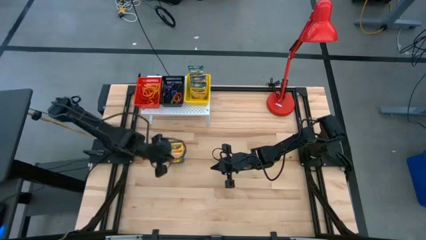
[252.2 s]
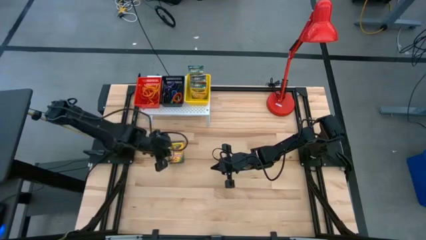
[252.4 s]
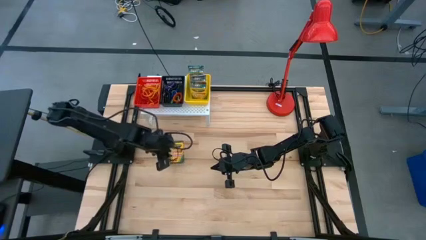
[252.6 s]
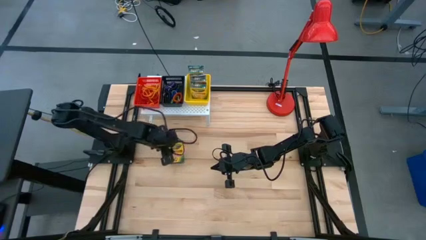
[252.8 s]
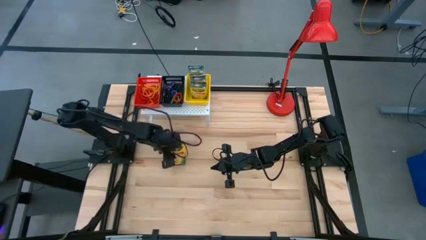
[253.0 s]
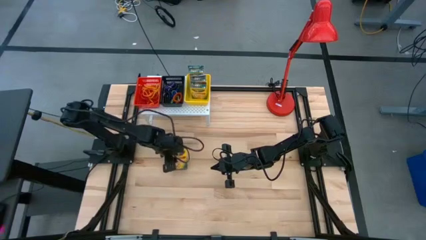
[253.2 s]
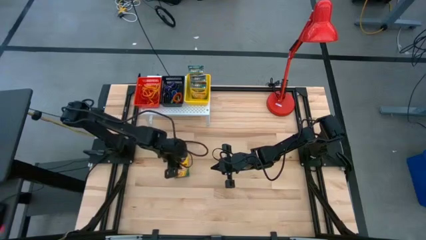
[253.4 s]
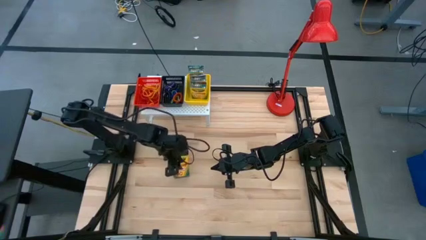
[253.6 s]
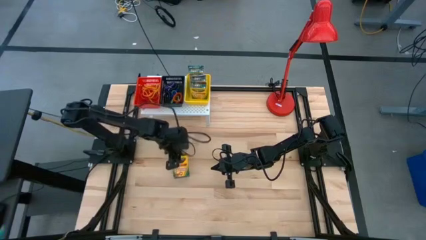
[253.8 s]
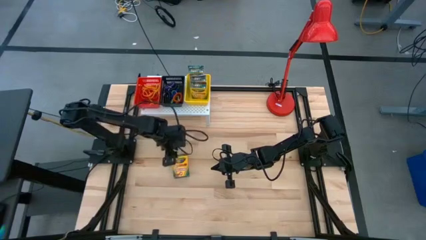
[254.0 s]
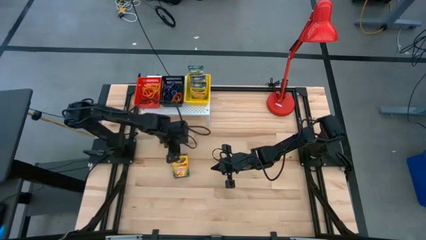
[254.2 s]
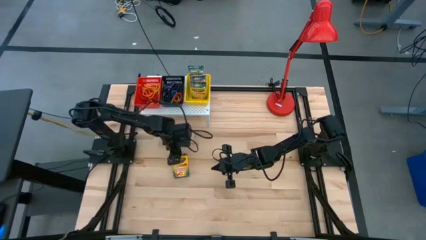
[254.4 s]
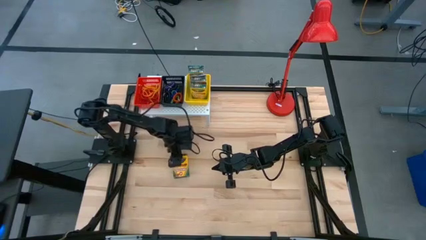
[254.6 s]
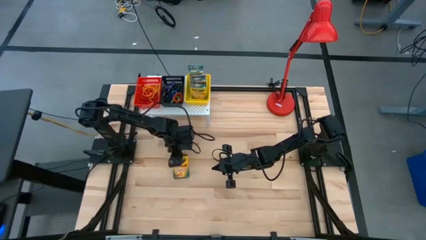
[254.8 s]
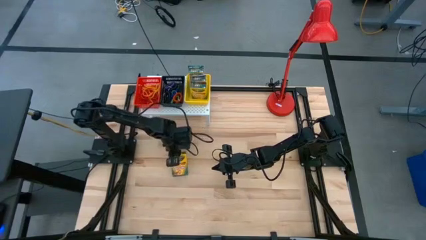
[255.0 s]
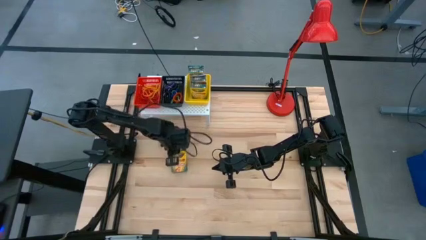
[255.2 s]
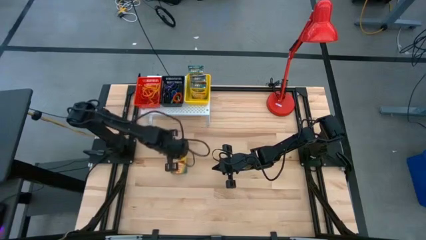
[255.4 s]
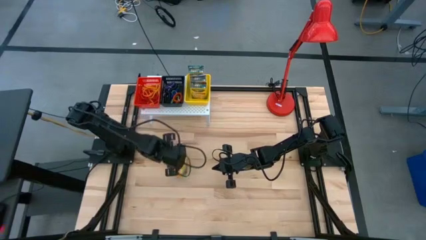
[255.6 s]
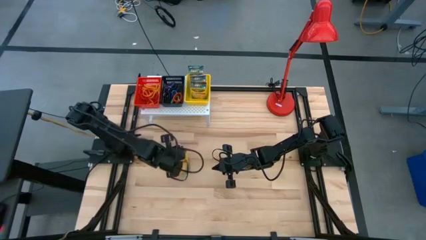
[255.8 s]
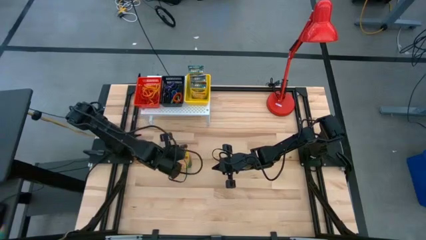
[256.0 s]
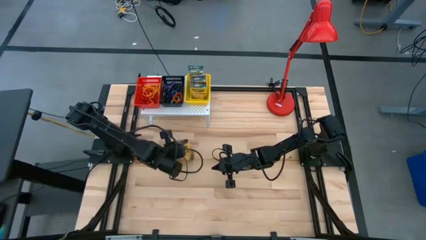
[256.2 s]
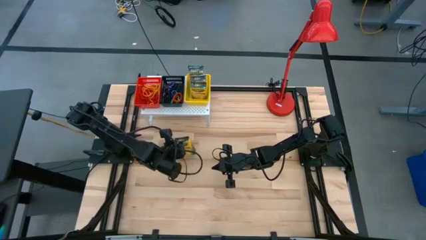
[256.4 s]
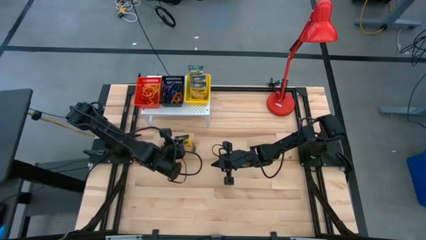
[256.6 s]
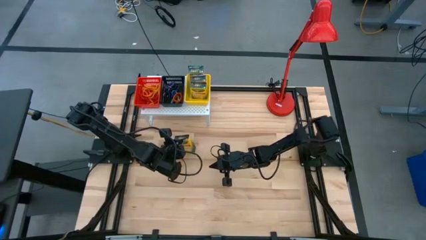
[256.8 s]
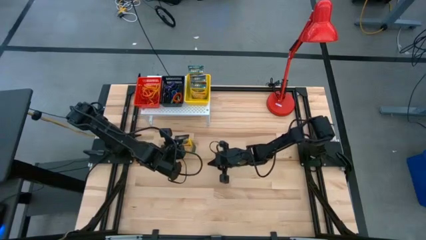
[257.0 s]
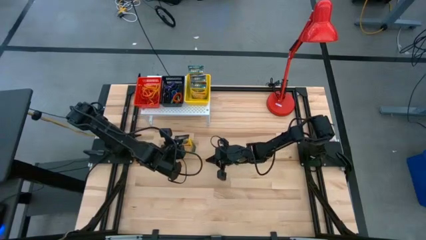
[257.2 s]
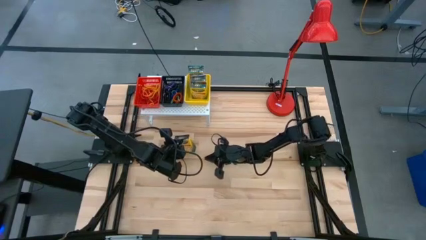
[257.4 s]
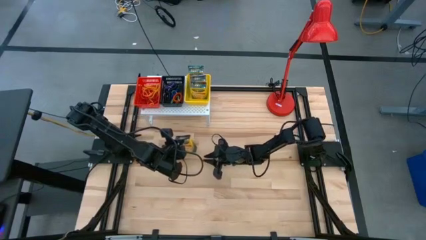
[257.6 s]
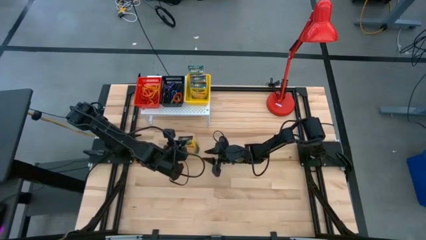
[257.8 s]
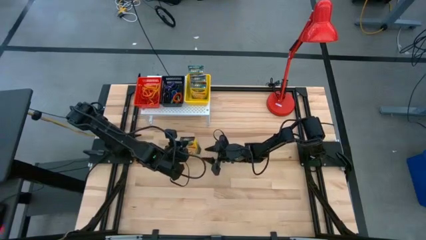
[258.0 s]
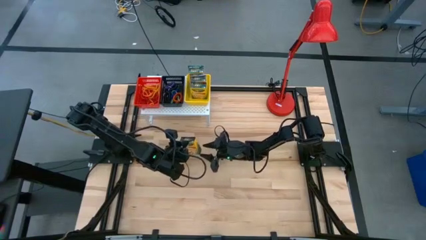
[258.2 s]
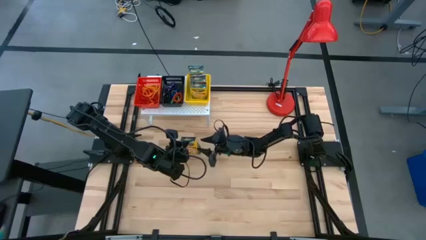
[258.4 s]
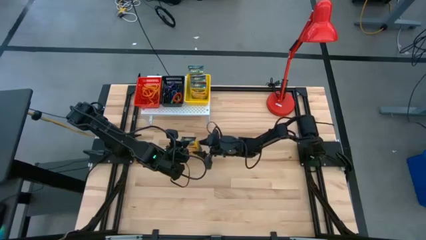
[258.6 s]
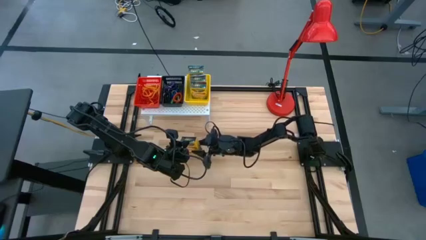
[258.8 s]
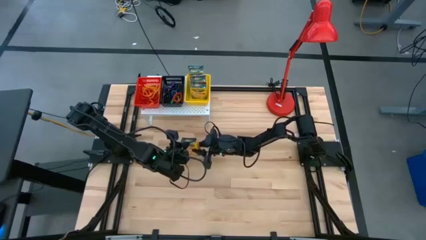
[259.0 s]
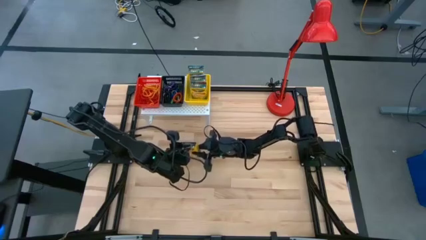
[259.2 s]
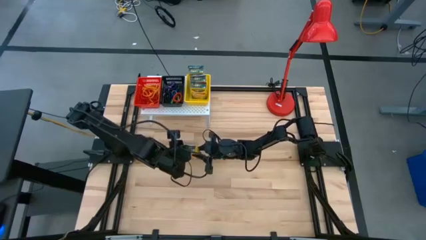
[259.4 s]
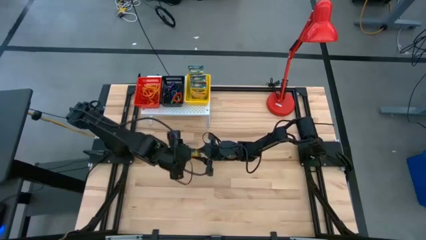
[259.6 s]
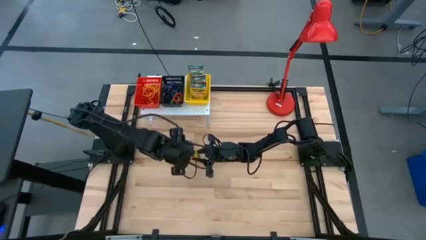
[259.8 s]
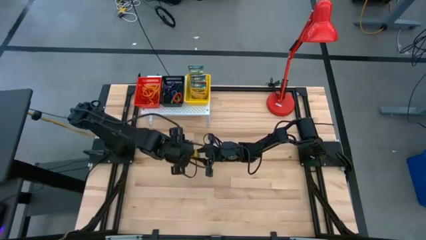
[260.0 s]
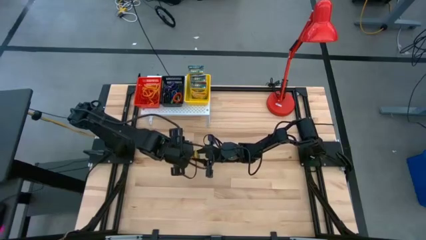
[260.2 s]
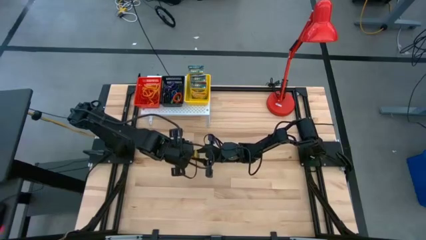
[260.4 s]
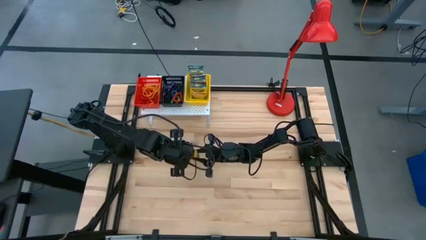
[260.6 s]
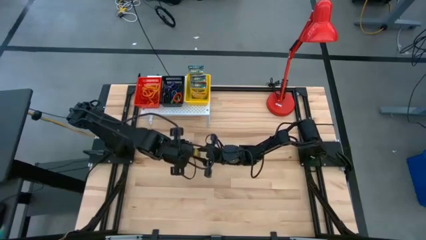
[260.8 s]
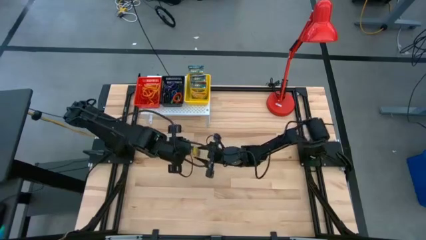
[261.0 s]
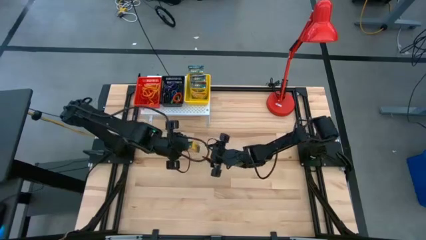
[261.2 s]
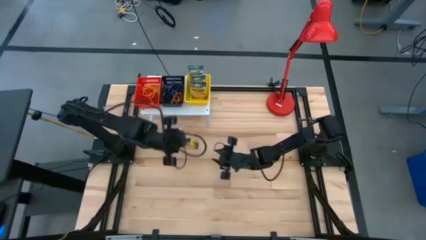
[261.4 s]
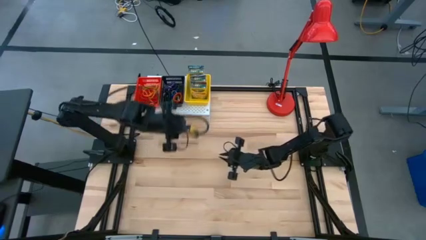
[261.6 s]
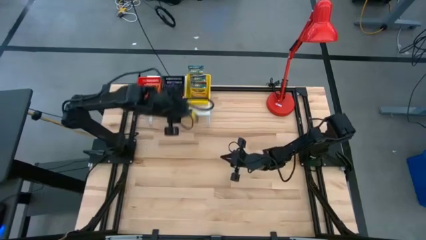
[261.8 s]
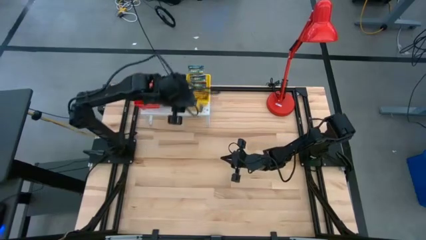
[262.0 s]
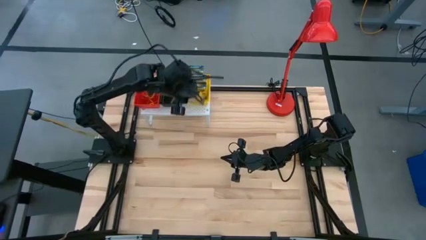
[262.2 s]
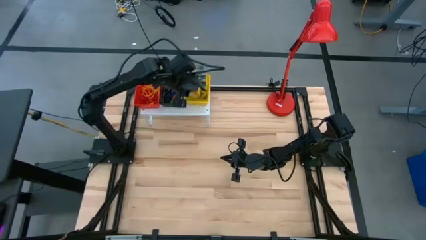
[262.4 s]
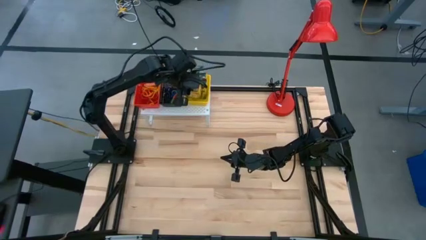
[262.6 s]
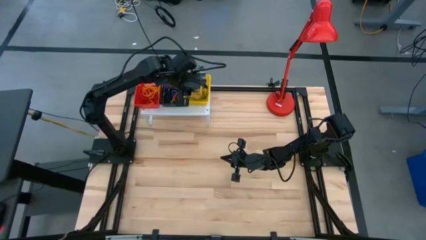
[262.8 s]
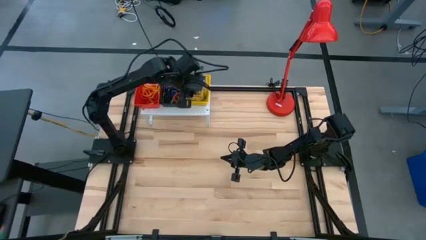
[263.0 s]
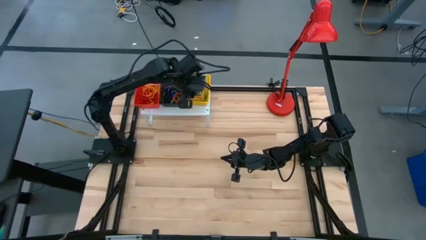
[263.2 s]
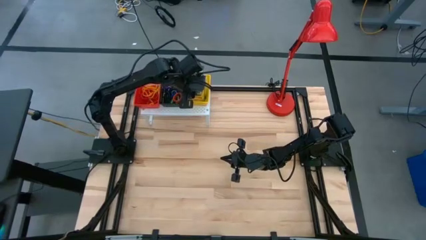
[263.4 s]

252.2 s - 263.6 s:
Task: Pick & Place Office Desk Supplies
Put the crayon box into the yellow bin on the shelf

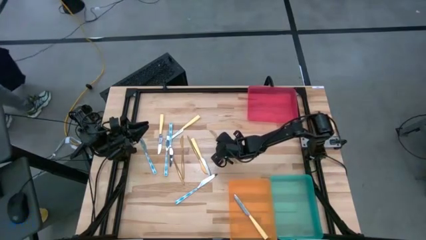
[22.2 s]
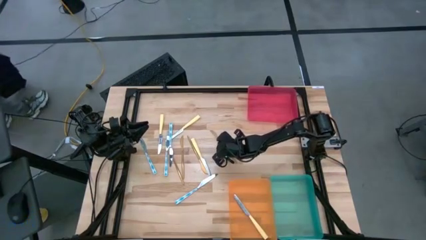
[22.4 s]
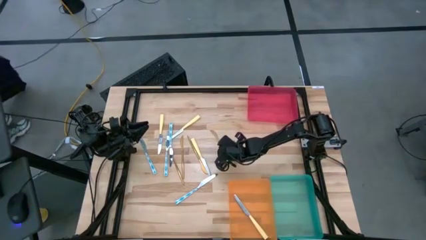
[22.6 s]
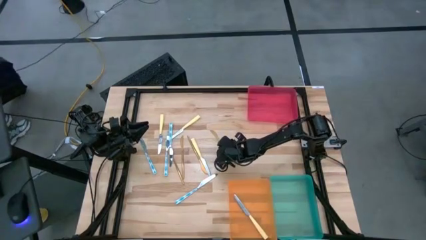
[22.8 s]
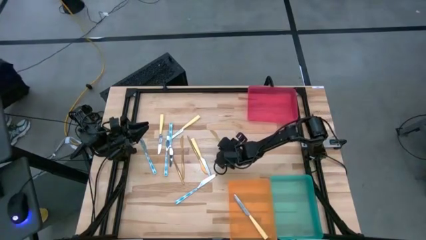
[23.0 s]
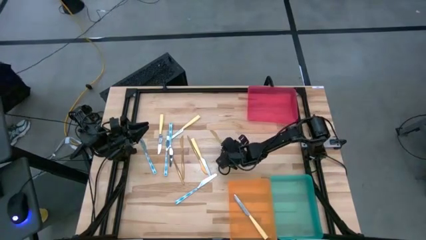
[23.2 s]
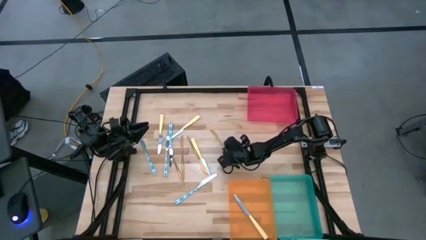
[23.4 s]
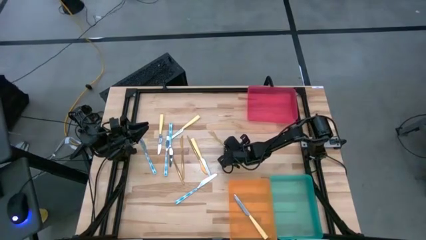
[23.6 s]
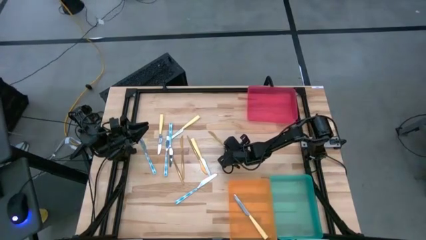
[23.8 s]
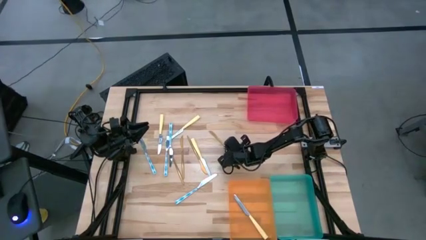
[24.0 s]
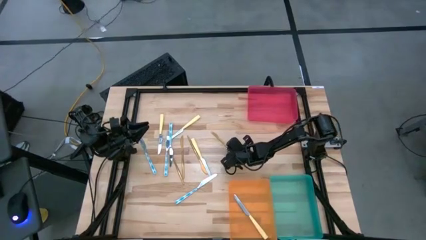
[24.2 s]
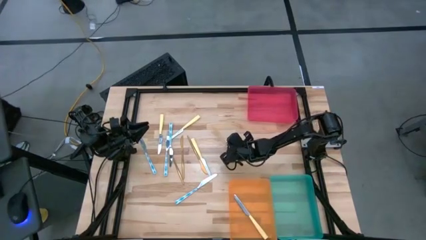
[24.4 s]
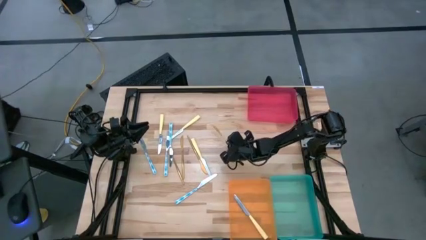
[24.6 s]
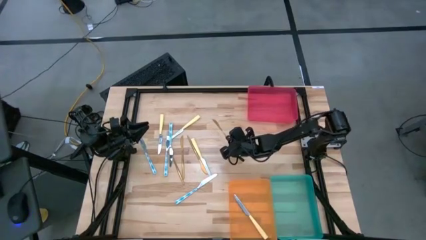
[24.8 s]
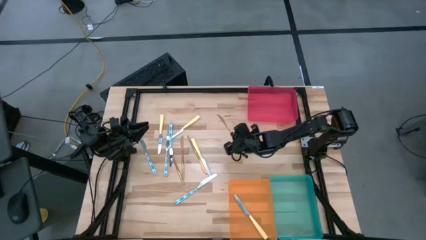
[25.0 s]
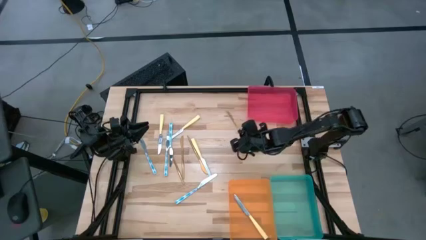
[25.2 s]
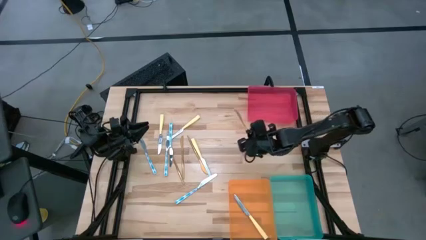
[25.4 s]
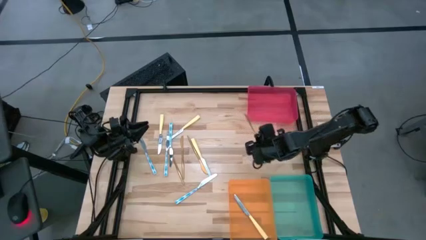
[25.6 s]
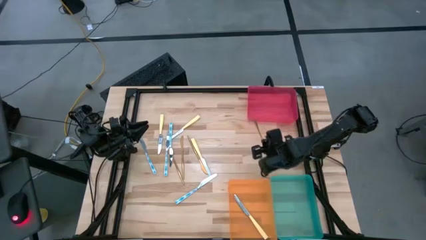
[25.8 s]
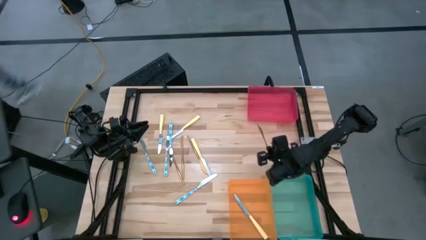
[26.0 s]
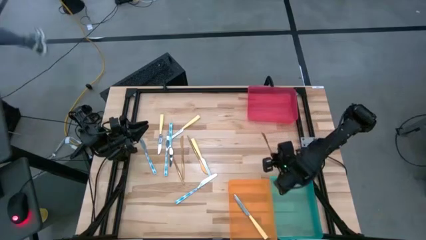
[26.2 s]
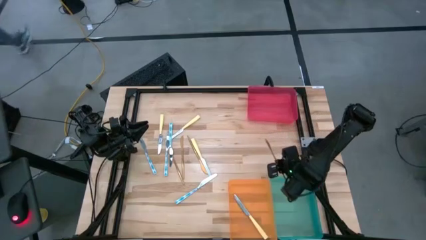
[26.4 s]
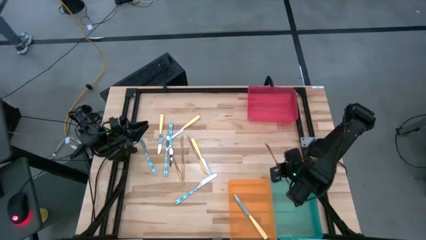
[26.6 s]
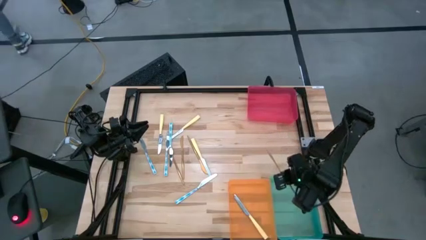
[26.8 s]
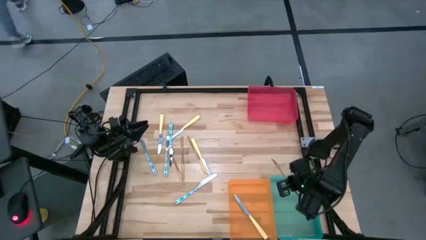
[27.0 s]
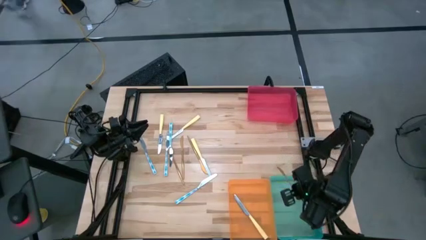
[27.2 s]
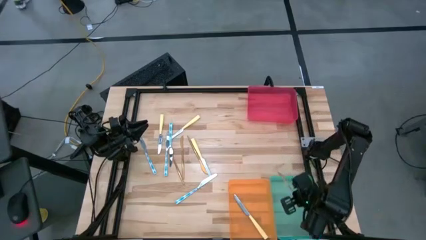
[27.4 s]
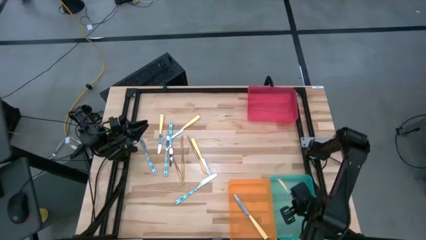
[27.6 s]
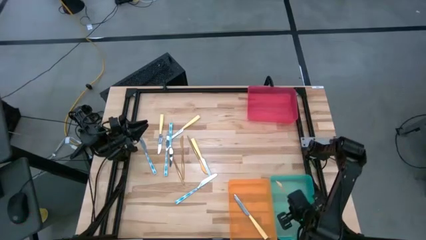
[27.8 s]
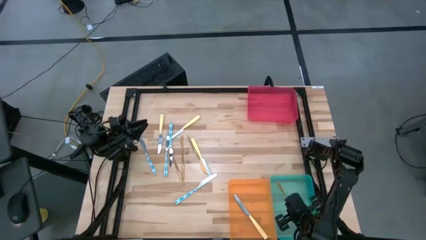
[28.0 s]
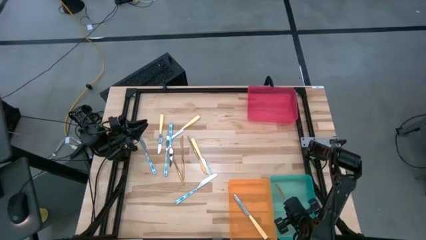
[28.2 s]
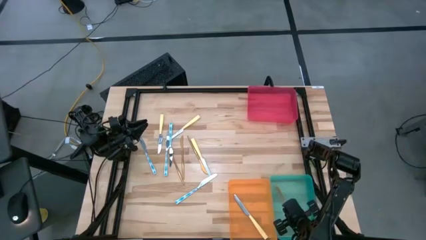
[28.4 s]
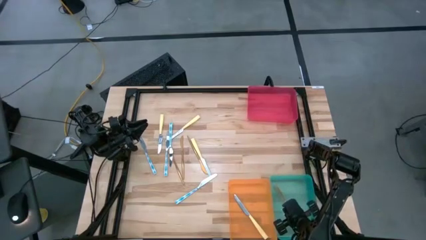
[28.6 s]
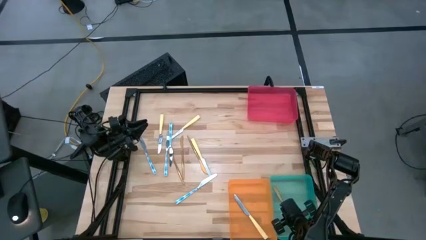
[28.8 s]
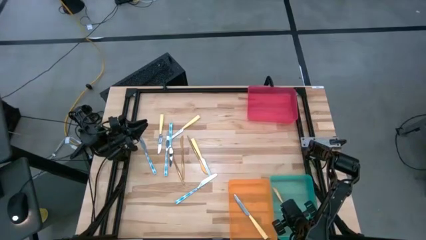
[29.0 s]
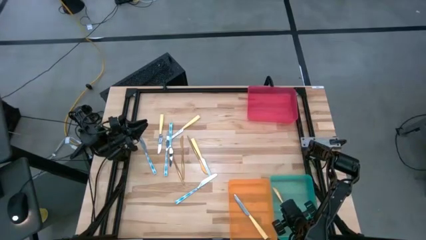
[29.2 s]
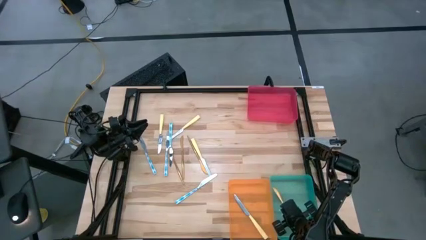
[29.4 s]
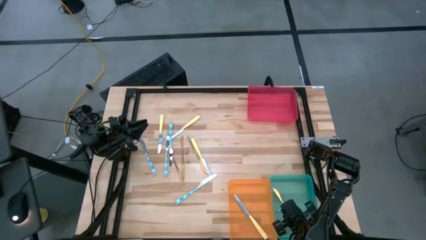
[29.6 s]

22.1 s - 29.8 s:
Task: Sort silverware by color (type)
Put the gold knife into the blue bin
